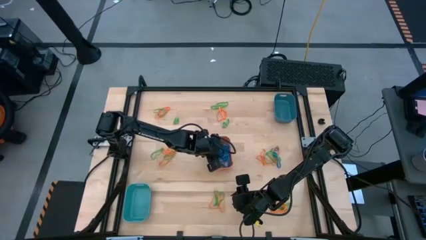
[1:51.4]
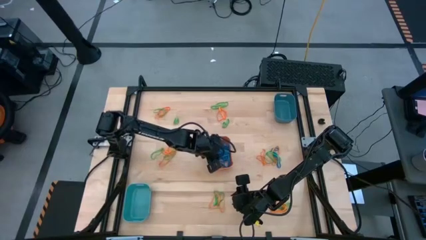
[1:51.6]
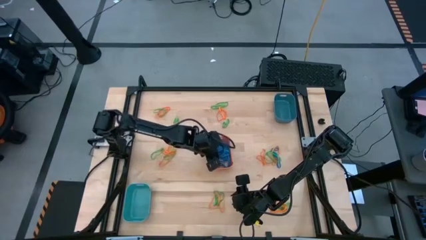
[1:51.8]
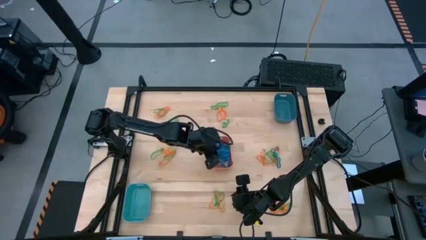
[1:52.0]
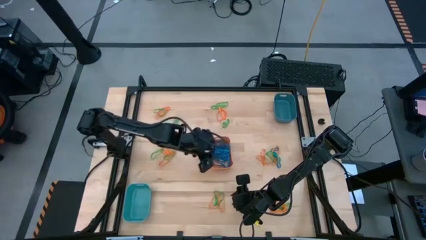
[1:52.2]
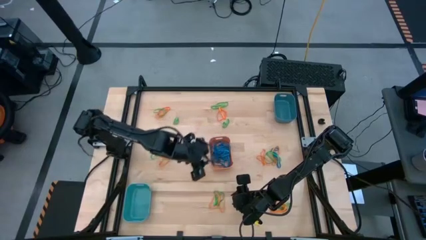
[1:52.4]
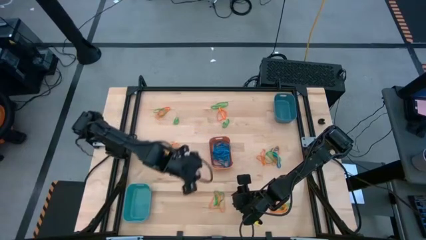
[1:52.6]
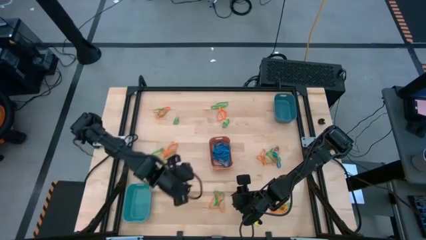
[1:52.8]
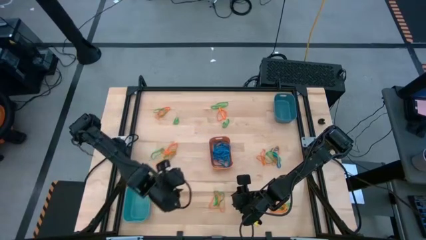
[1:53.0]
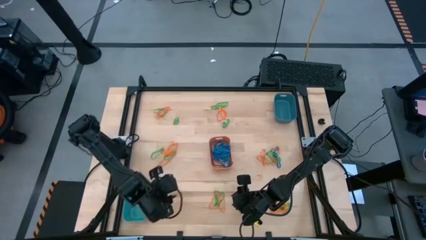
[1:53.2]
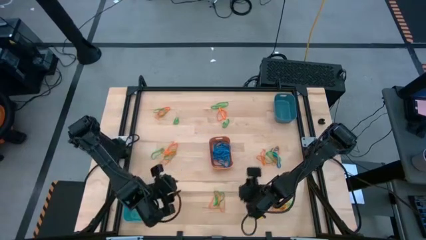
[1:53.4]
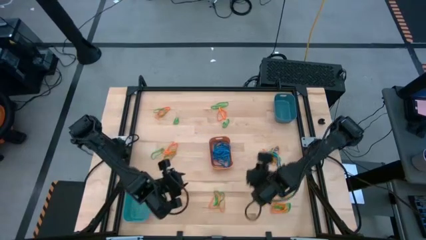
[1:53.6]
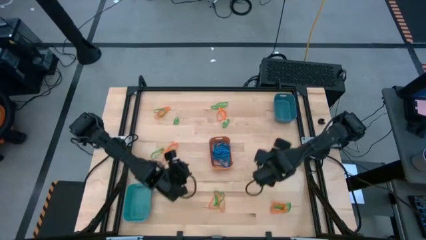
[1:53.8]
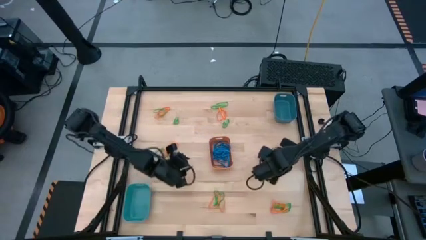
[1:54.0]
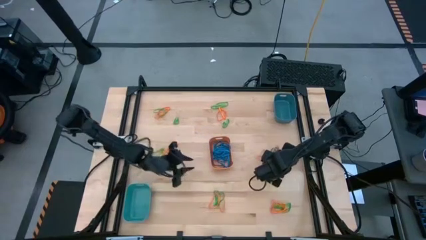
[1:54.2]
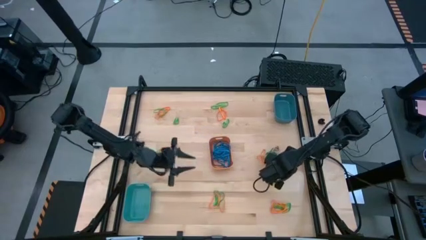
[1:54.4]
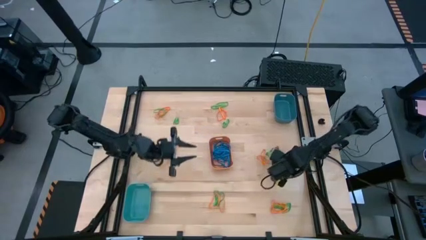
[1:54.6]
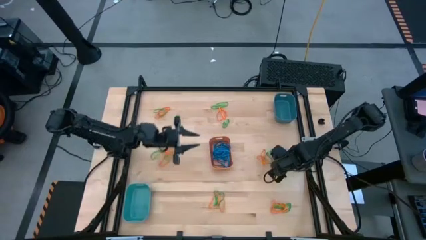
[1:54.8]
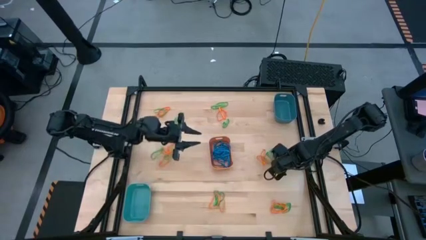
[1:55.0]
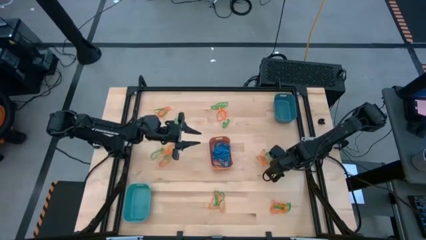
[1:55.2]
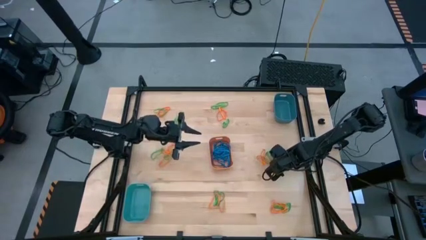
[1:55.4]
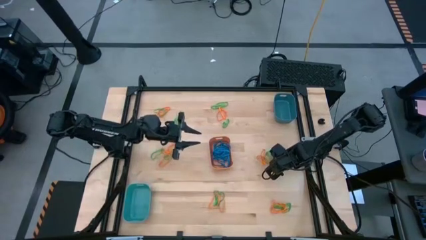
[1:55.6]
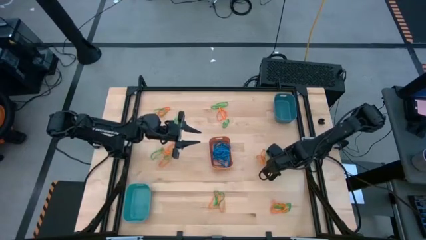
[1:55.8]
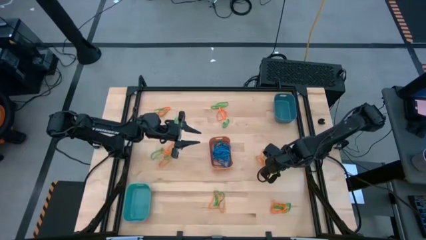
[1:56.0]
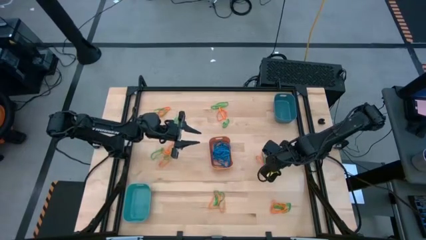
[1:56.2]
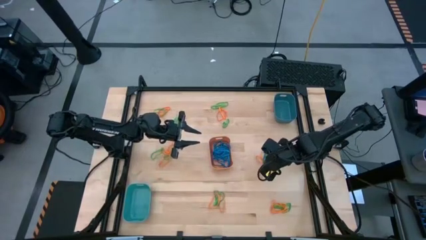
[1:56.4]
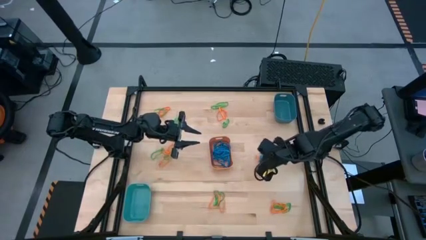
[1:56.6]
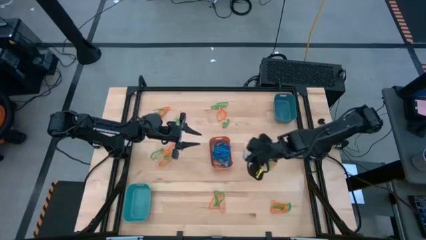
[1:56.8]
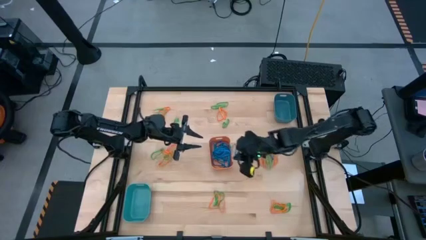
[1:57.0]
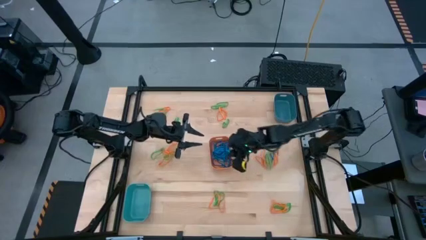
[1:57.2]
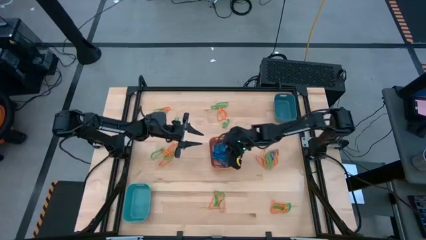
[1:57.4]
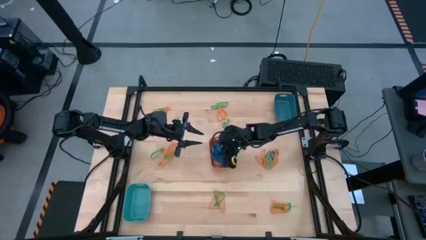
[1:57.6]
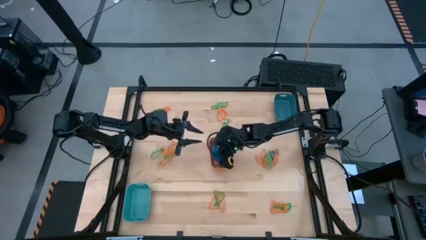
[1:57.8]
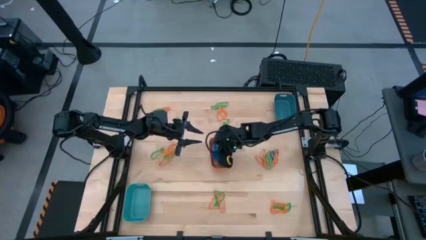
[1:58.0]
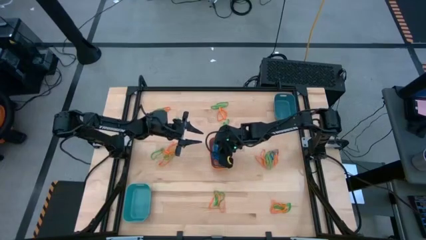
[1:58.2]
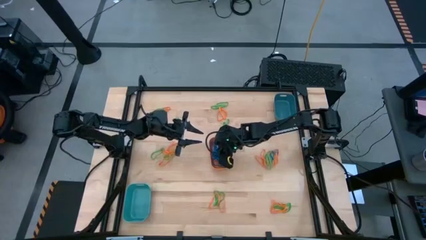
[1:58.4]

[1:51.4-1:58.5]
Task: Sort rubber bands into baskets
Put the blue rubber band into the orange bin

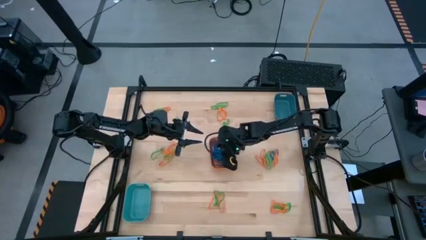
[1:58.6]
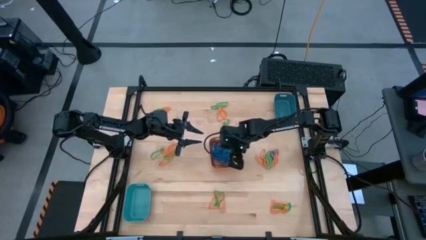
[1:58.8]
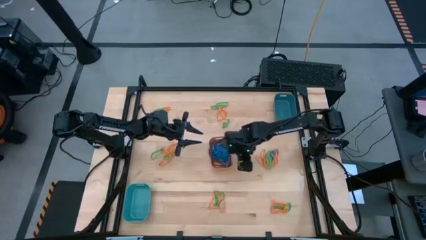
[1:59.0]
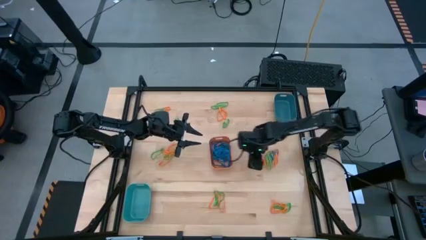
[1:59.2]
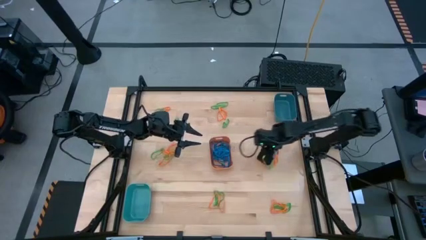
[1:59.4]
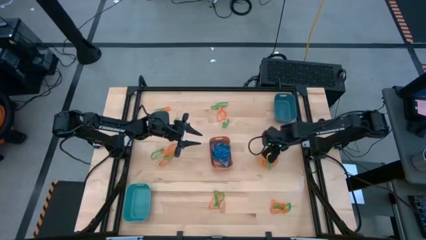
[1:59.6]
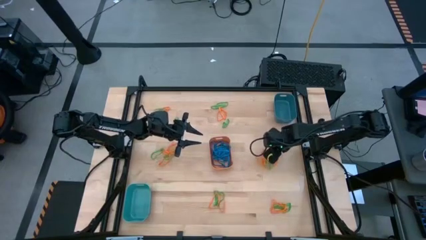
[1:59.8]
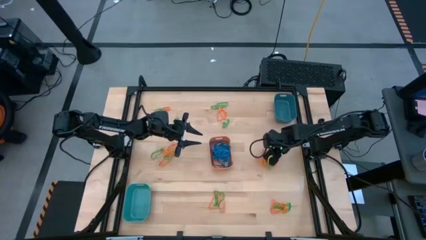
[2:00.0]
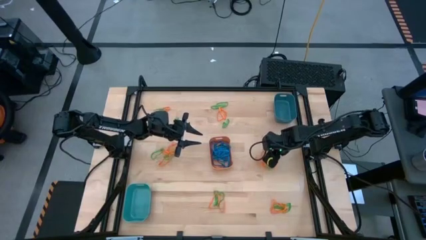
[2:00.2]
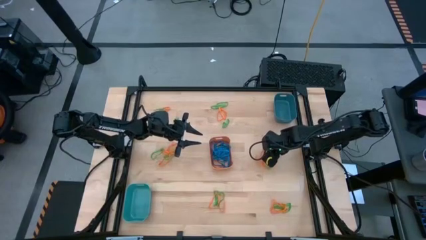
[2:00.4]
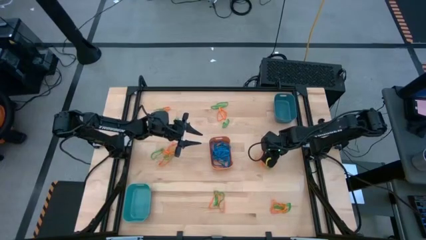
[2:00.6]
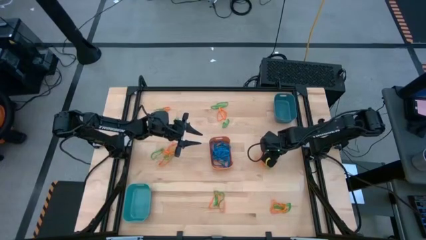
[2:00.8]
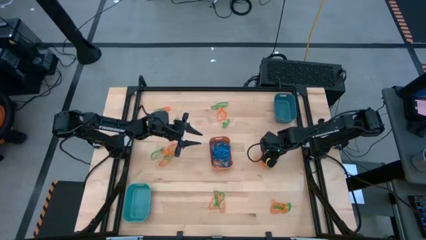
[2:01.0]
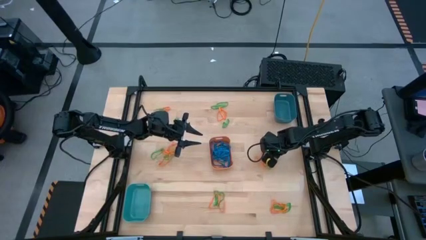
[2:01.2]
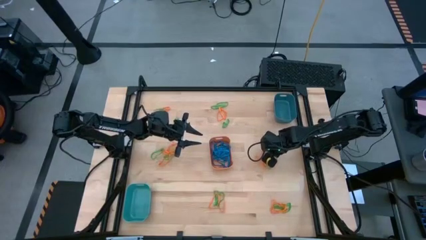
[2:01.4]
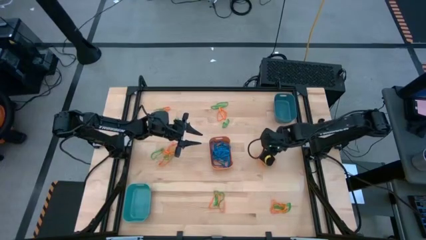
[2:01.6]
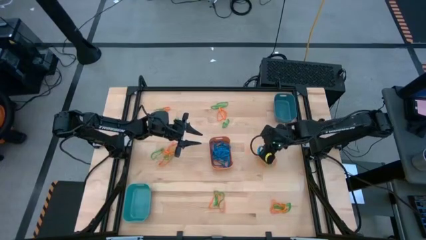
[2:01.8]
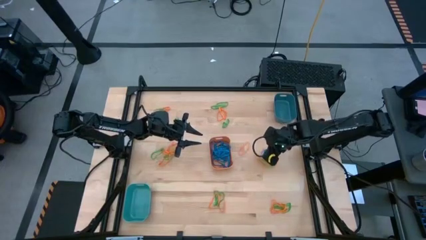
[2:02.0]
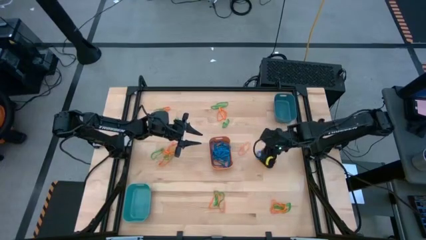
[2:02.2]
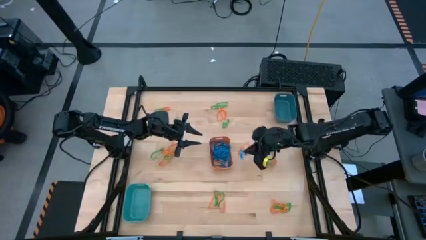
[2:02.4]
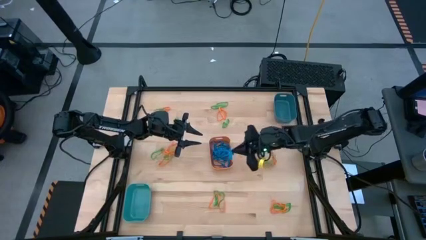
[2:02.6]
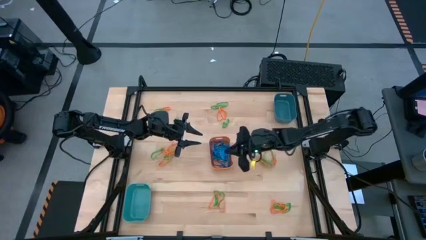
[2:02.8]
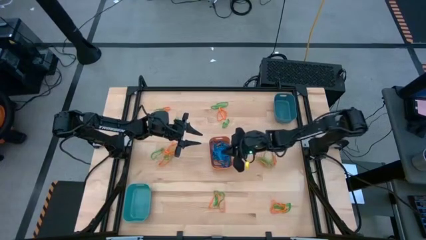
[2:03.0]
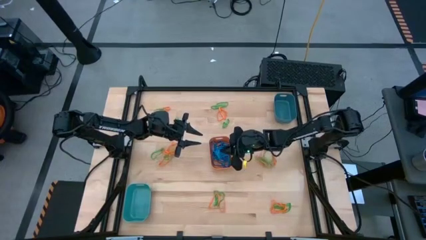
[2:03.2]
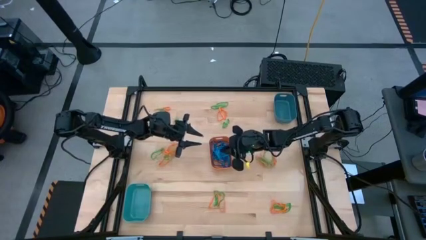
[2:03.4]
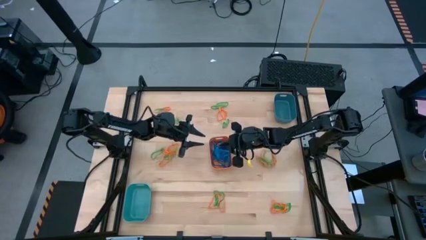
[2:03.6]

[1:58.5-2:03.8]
Put the blue rubber band into the orange bin

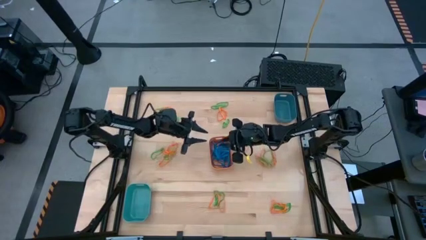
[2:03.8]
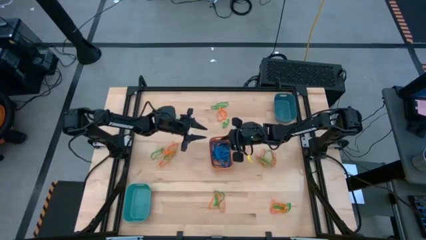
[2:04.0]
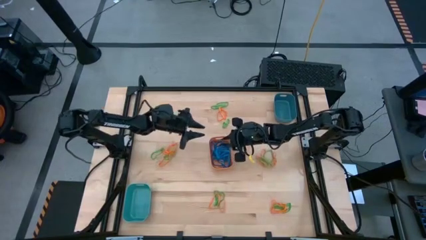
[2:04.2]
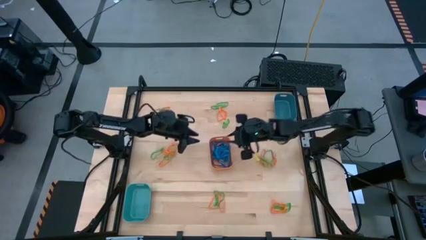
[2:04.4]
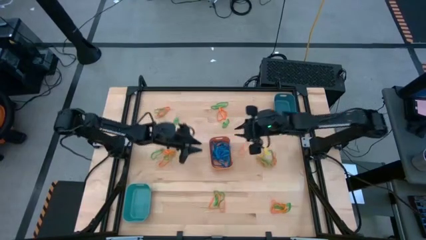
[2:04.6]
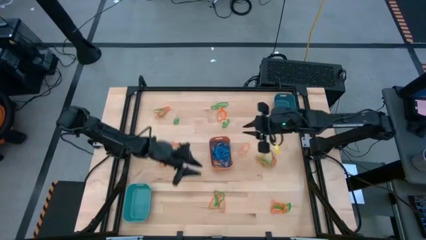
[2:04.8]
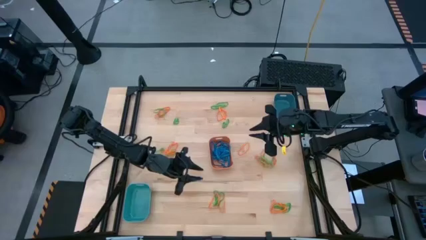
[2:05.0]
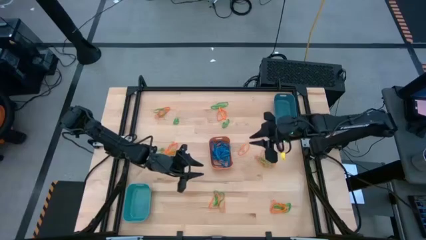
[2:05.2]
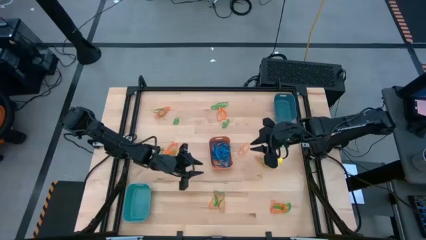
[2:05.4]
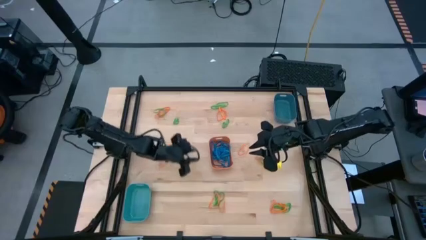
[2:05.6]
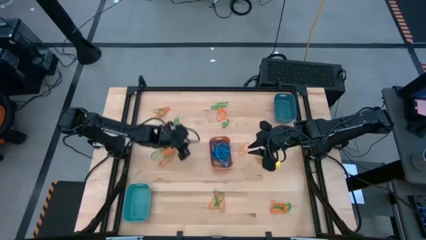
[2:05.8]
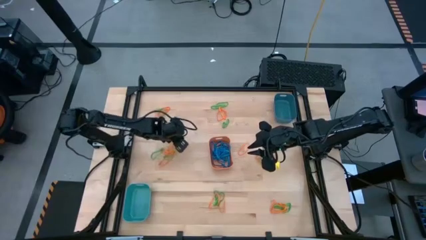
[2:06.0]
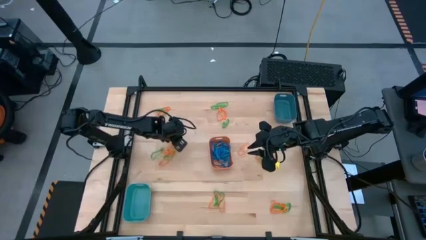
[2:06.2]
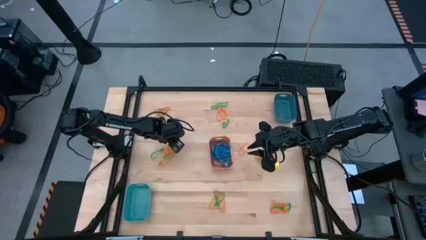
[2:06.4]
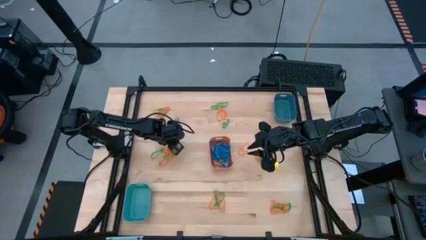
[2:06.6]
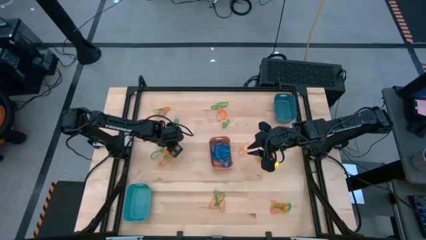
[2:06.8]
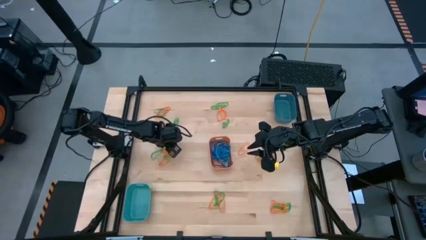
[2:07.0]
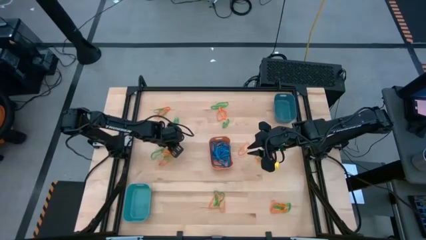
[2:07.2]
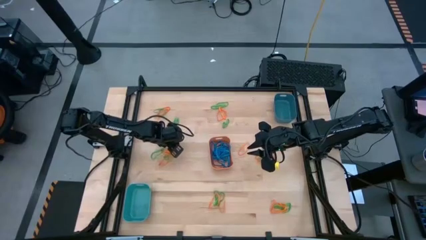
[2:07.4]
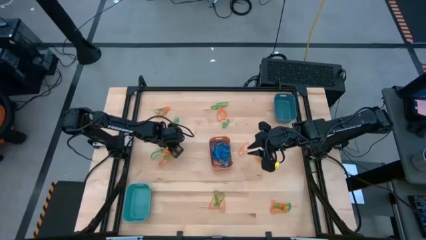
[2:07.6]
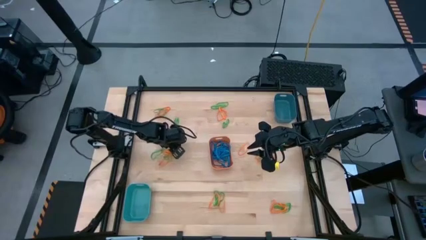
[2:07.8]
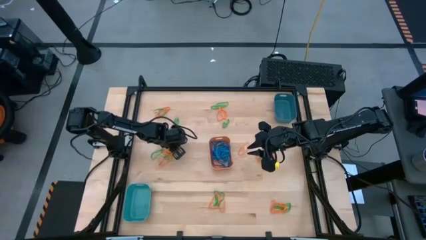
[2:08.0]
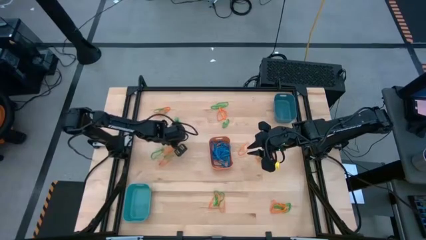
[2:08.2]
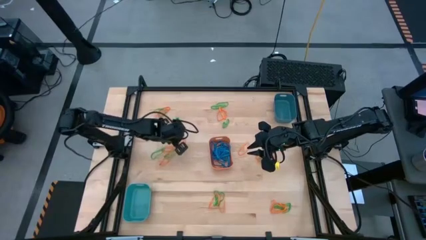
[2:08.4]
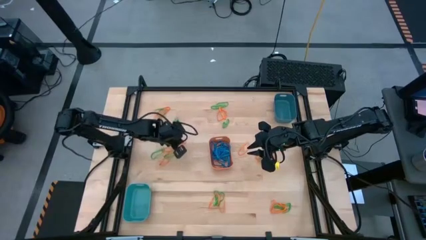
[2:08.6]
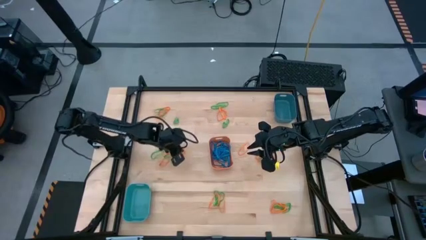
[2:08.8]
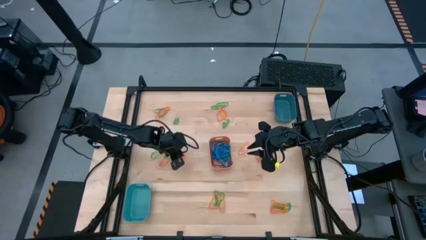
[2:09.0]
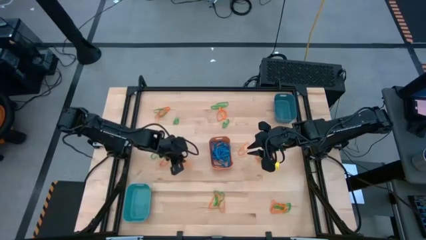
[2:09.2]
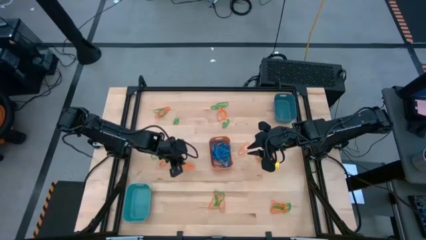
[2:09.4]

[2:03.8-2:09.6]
Put the orange rubber band into the green bin
